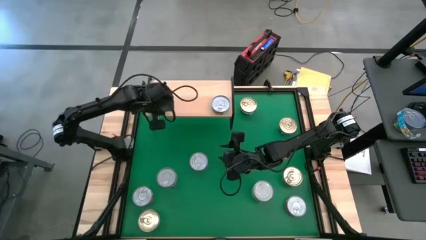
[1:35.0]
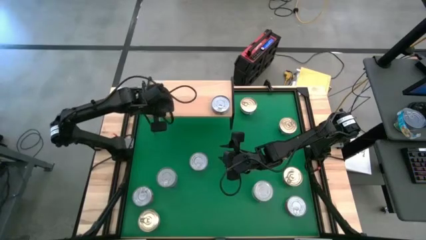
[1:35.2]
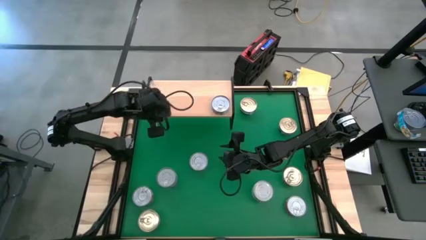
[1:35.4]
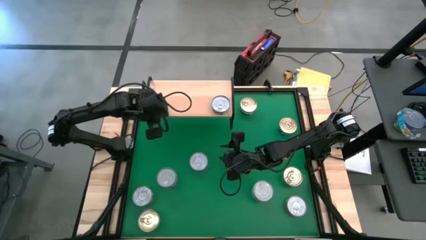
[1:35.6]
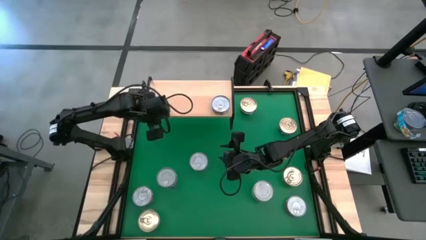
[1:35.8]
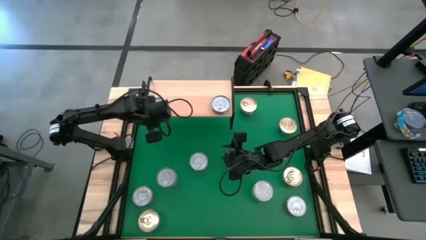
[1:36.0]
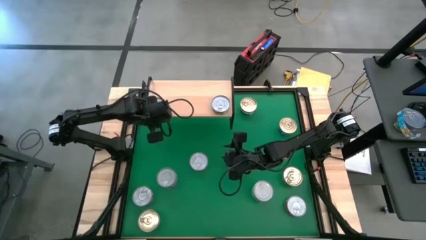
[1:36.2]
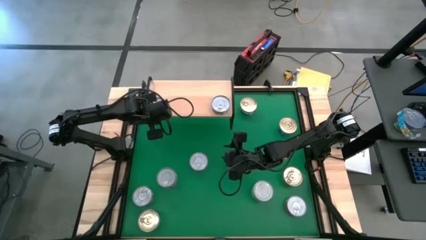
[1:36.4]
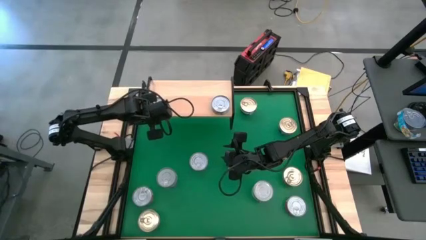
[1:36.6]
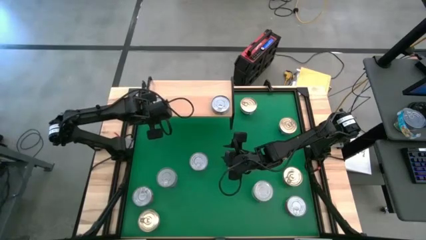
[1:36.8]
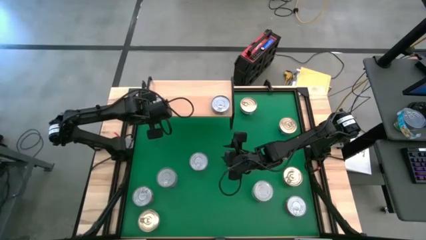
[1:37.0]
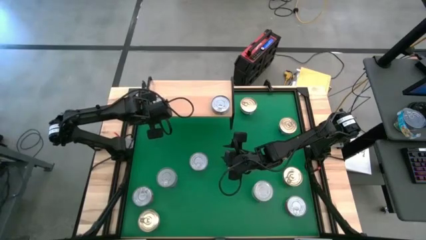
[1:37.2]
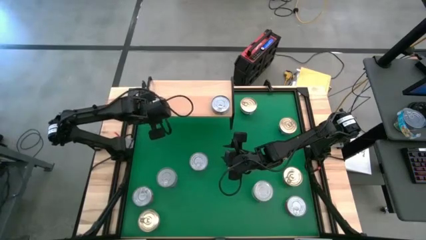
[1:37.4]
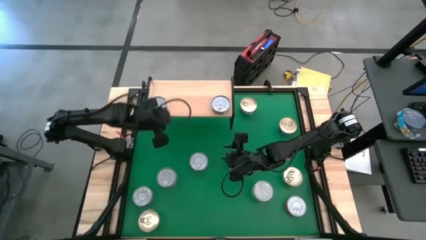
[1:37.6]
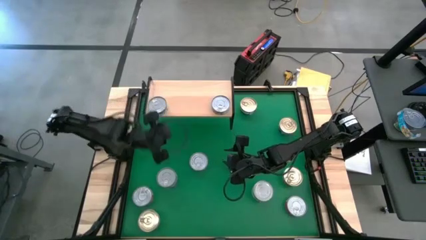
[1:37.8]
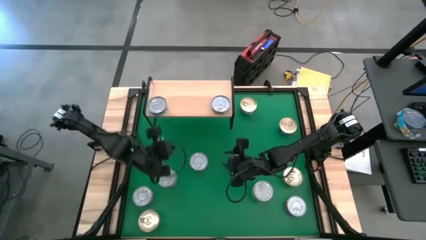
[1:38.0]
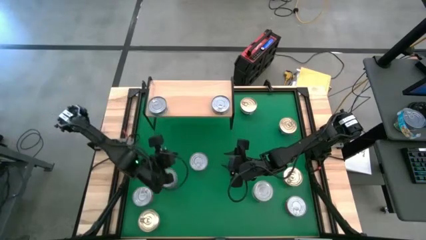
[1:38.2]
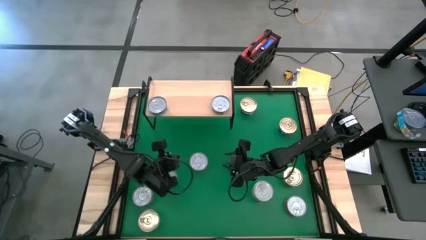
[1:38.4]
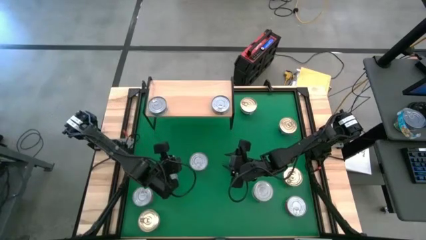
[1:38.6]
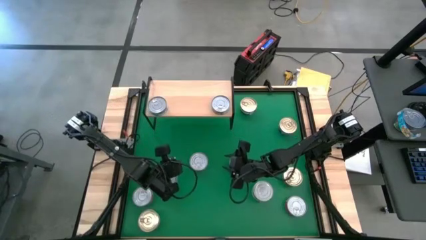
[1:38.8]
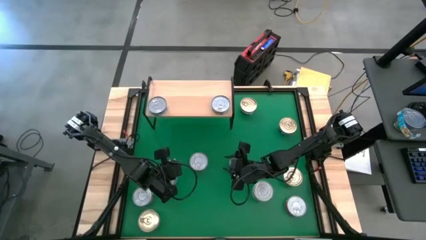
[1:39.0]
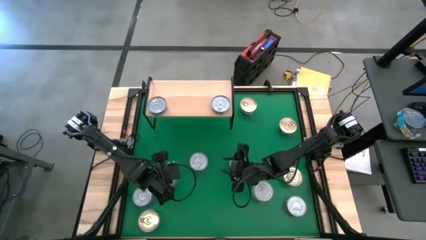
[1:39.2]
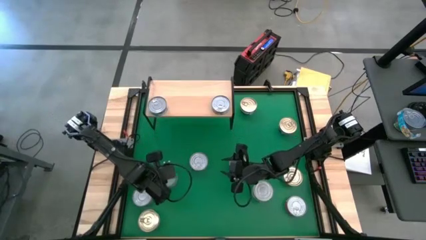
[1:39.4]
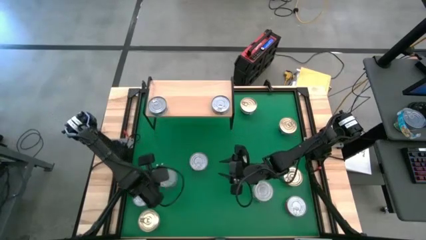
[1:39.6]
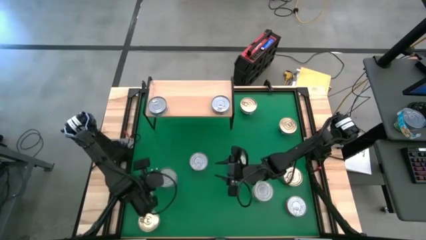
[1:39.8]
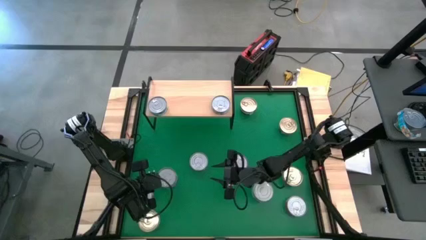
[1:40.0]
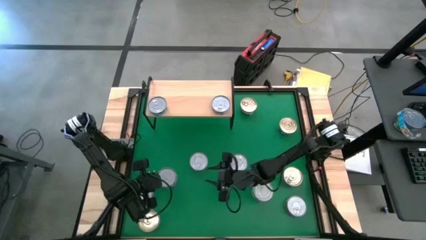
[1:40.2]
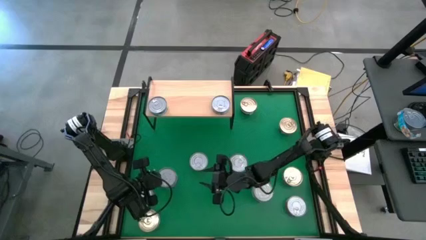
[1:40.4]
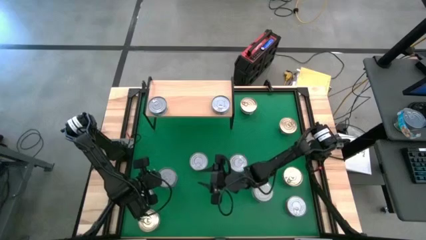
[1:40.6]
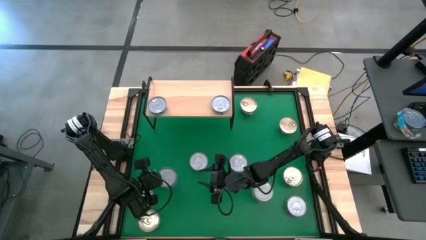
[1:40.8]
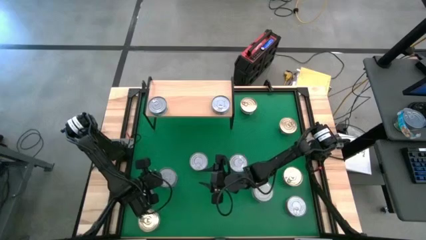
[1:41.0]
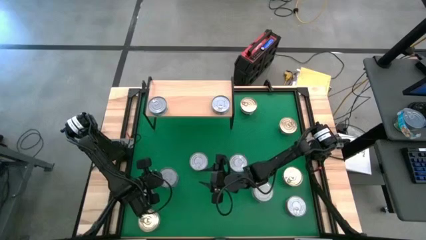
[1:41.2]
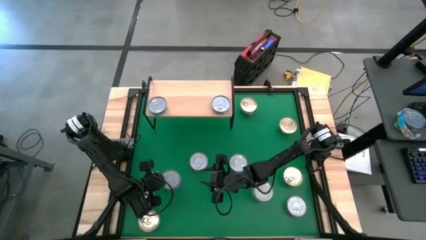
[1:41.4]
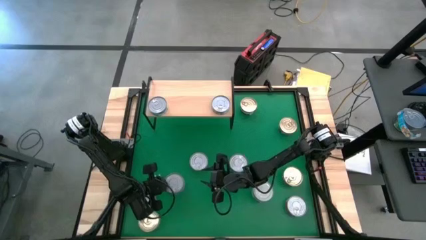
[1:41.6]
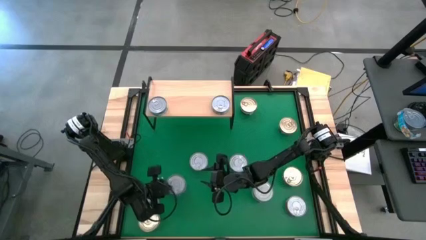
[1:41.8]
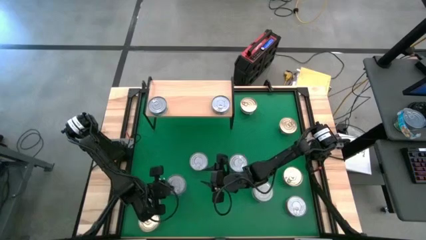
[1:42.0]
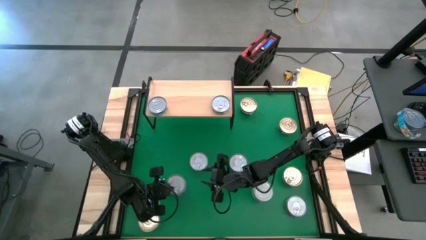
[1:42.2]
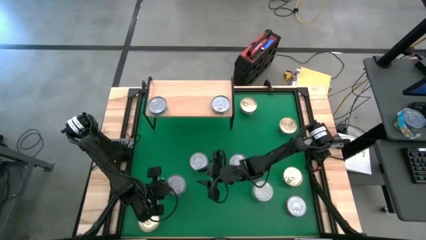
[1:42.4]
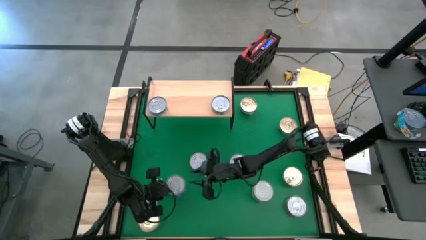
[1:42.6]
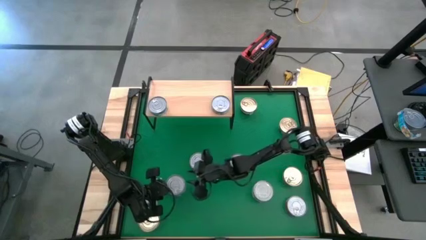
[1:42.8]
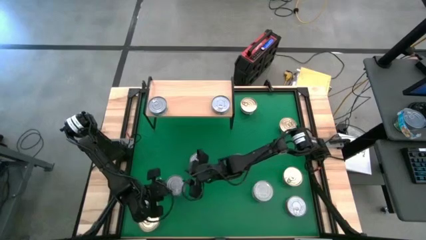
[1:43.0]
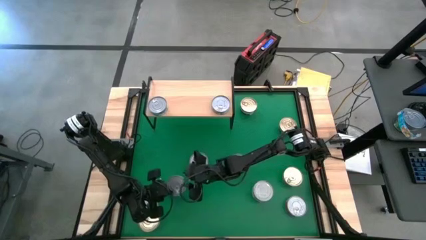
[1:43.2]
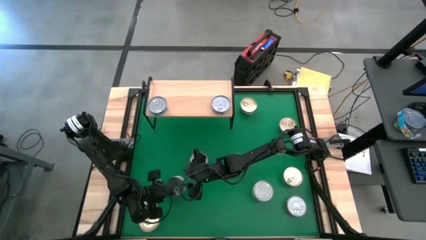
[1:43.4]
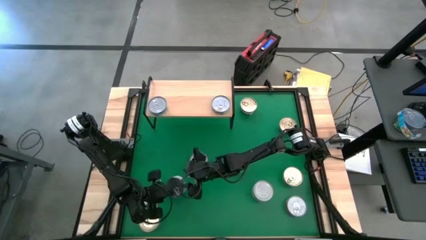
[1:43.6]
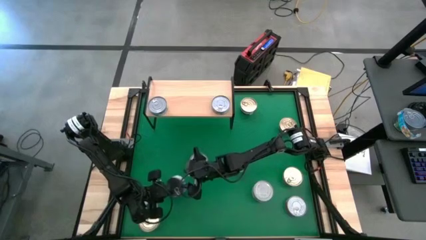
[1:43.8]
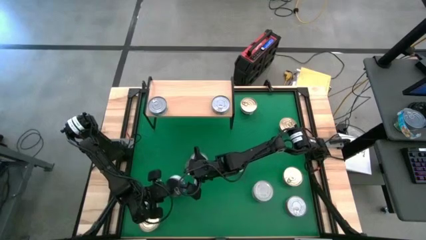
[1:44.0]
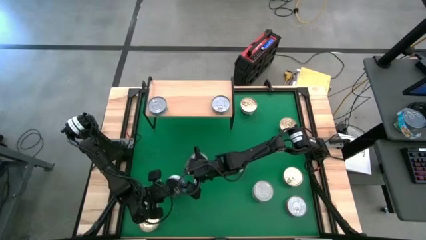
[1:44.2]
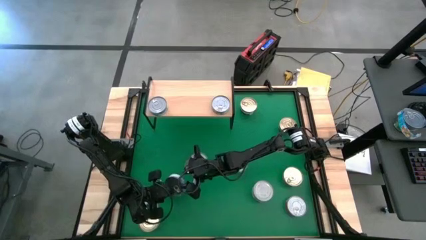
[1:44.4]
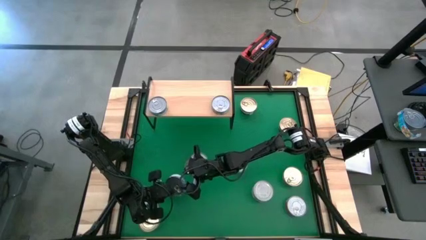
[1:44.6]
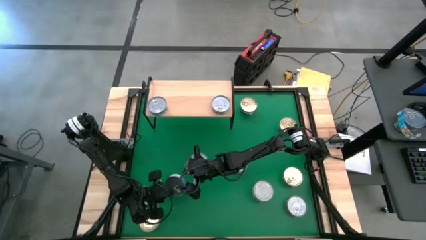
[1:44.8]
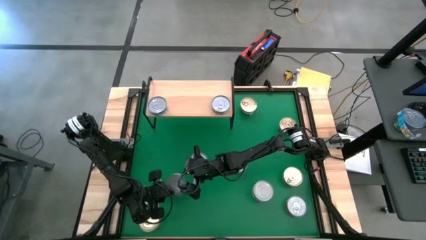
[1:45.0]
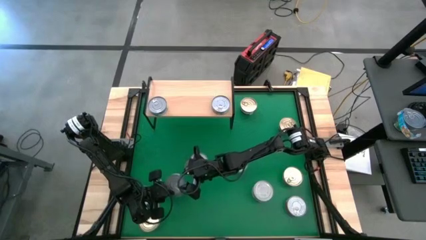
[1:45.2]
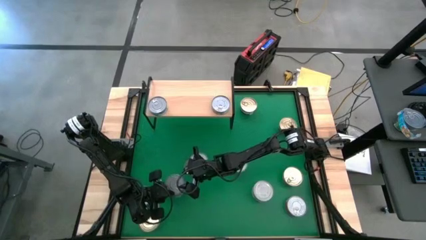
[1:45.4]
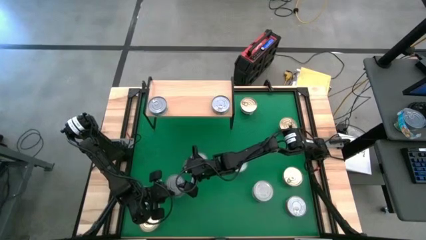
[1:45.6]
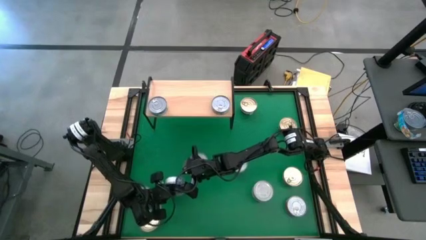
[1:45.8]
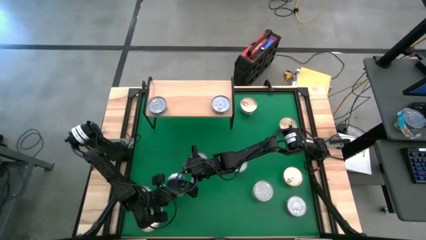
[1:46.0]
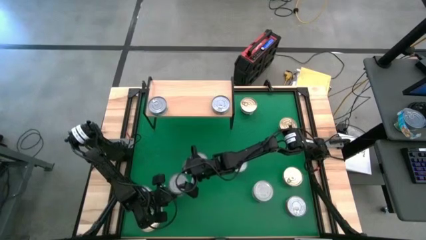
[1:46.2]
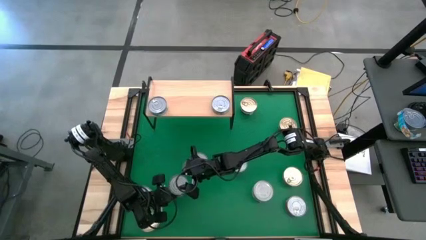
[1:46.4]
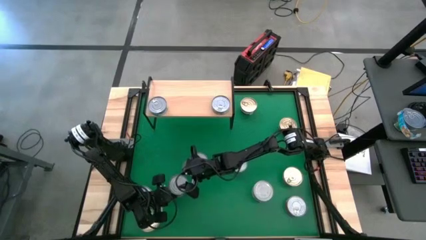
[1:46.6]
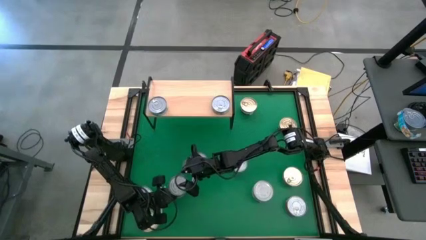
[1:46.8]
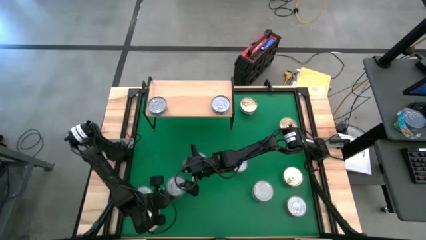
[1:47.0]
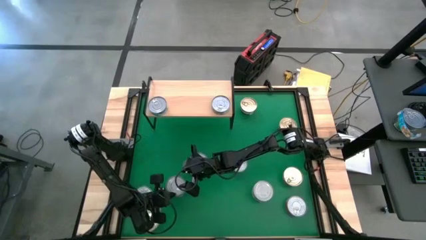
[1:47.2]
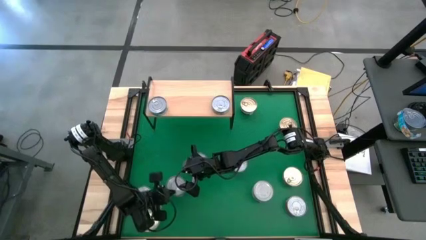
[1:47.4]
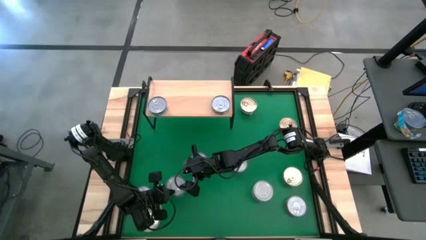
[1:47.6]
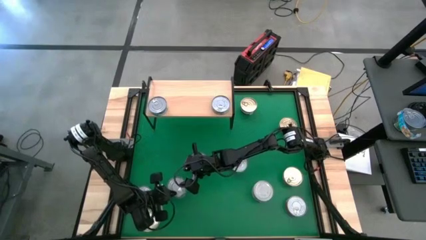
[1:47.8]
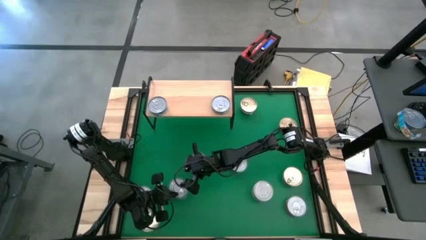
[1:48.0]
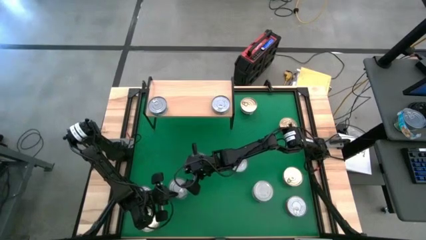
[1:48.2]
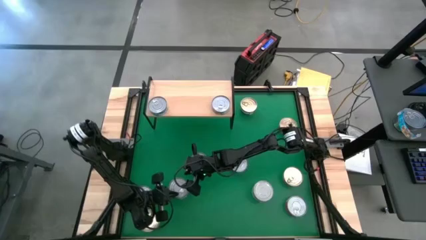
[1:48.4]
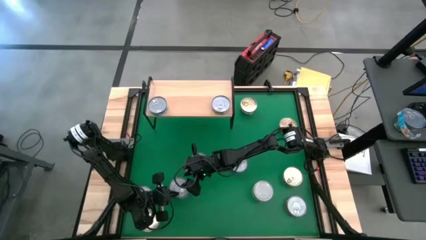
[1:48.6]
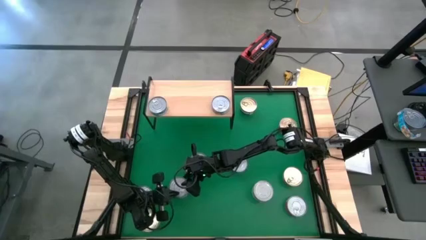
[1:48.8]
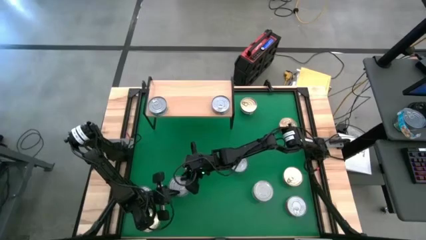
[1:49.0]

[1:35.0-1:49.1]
Task: Stack canned seafood by type on shelf
Put the middle left dark blue tuna can on the shelf
